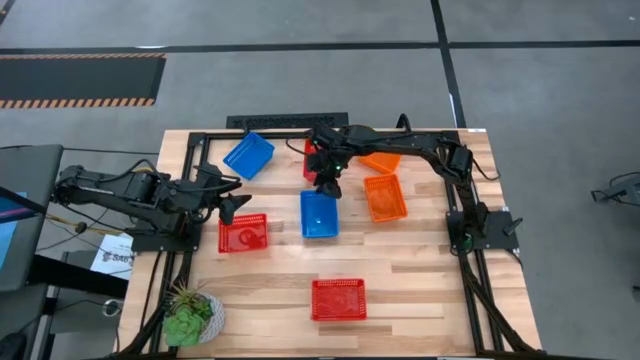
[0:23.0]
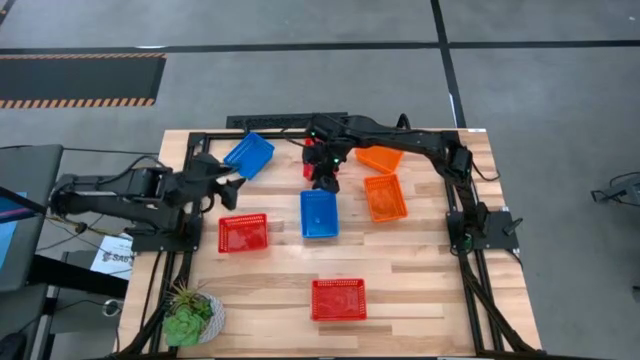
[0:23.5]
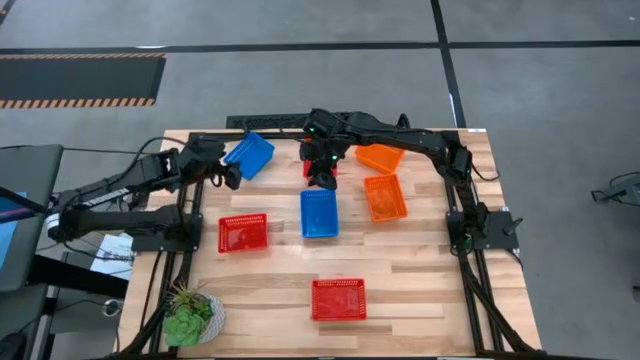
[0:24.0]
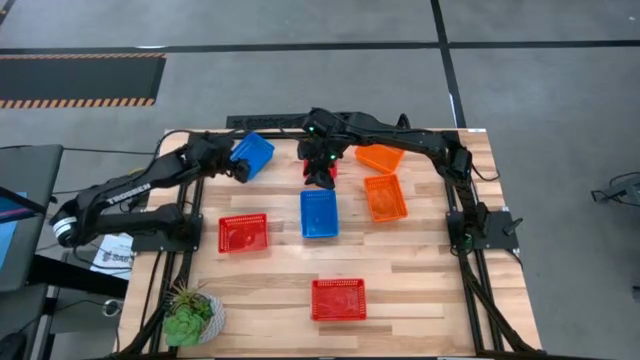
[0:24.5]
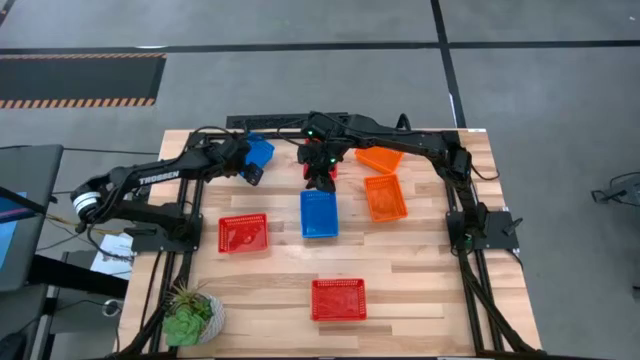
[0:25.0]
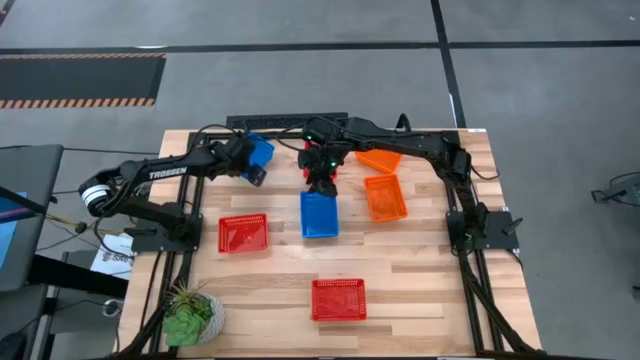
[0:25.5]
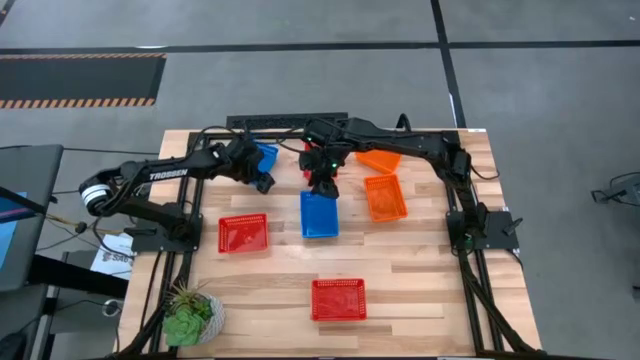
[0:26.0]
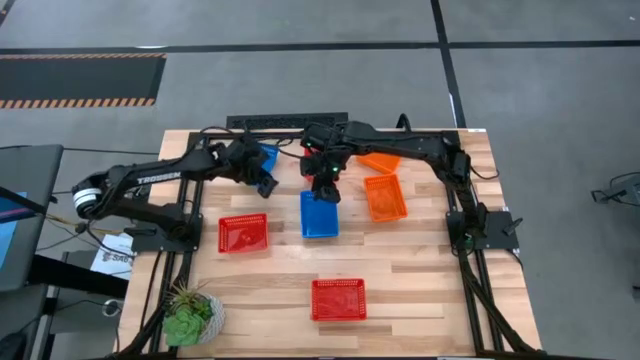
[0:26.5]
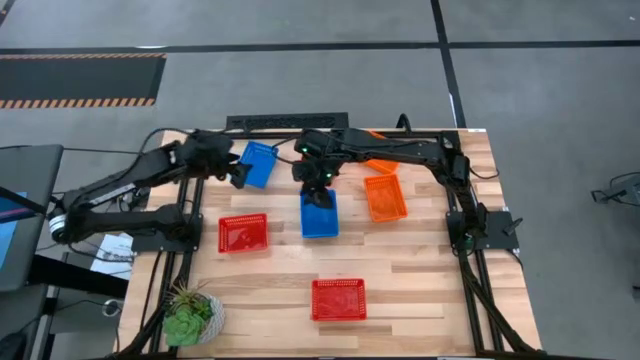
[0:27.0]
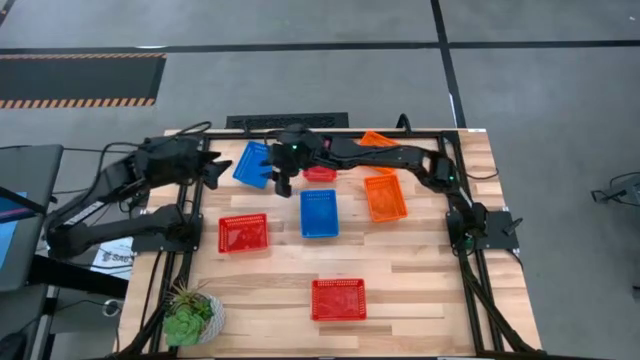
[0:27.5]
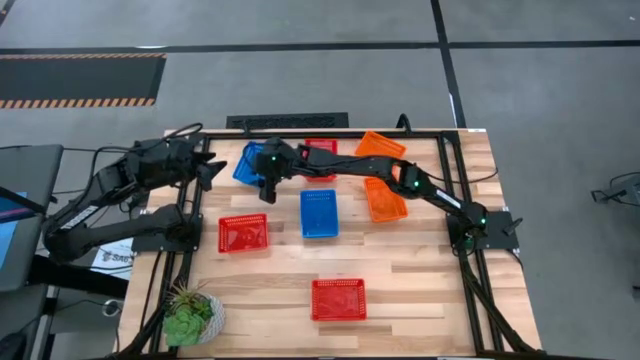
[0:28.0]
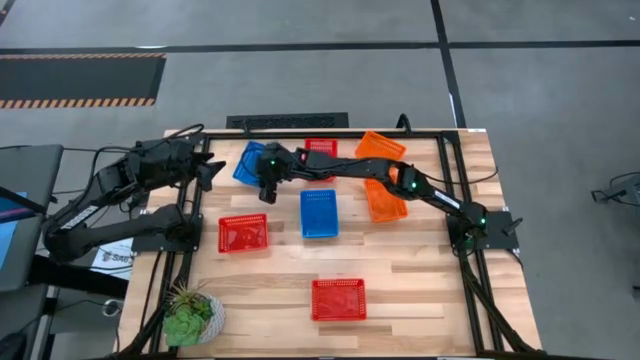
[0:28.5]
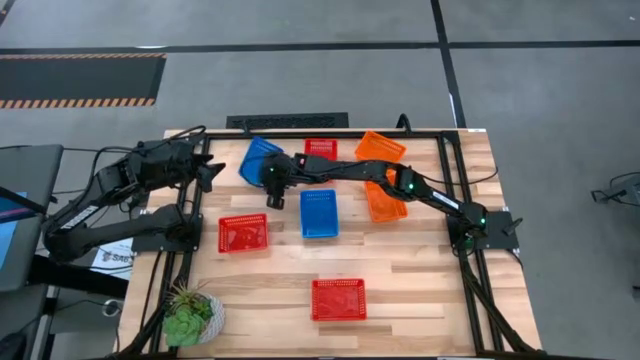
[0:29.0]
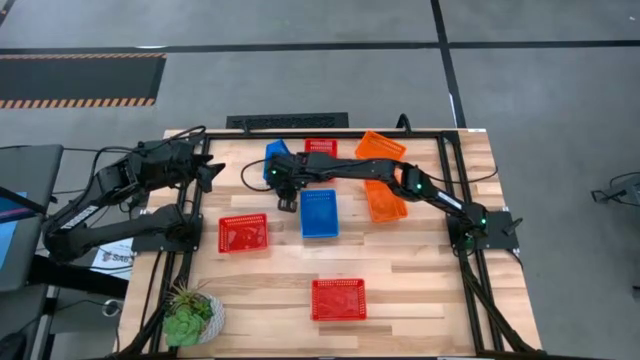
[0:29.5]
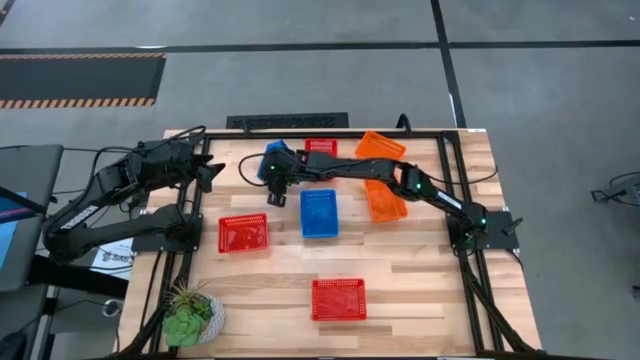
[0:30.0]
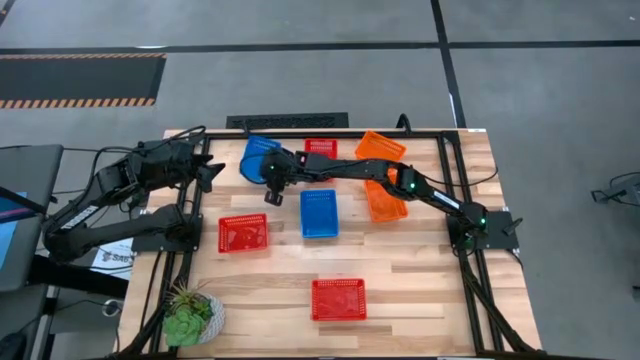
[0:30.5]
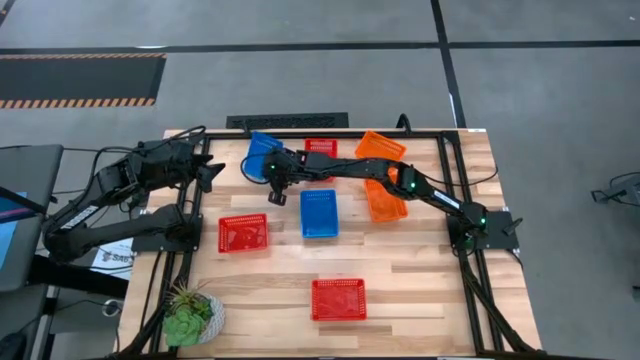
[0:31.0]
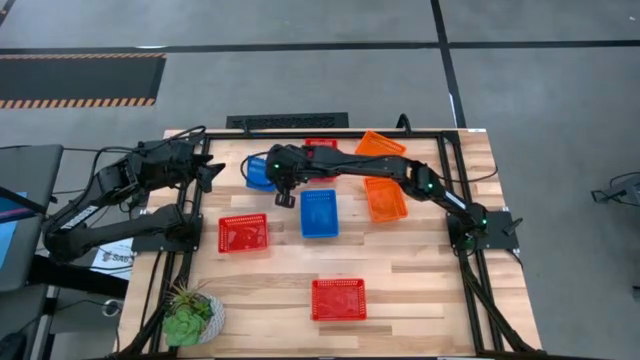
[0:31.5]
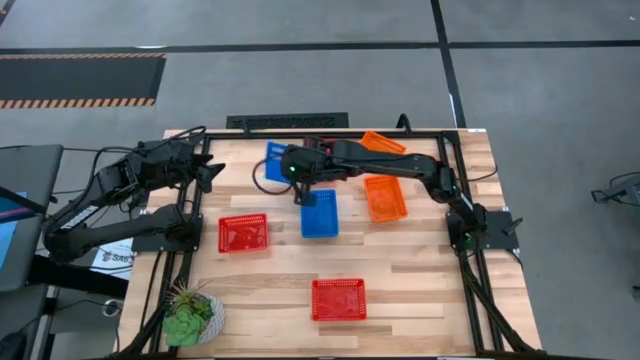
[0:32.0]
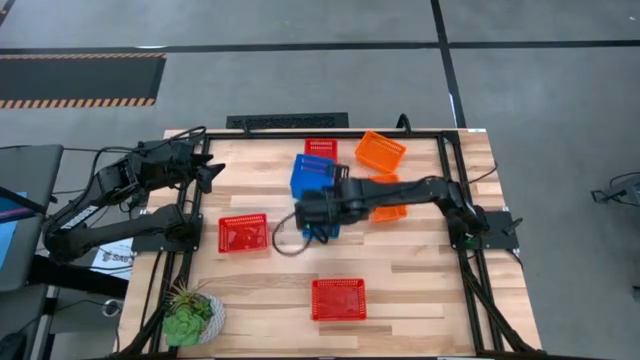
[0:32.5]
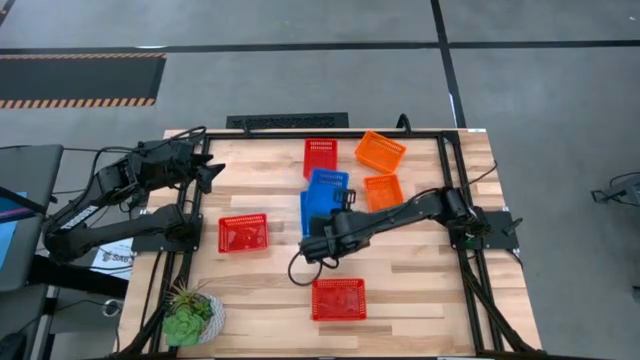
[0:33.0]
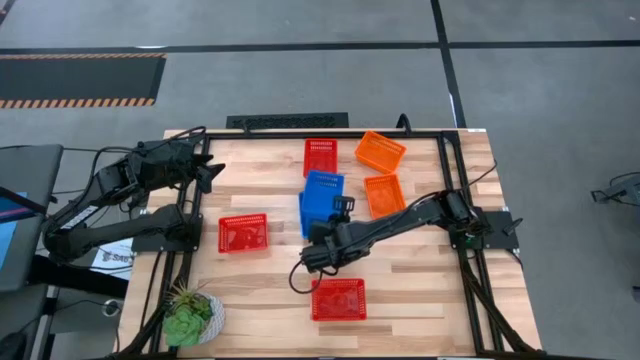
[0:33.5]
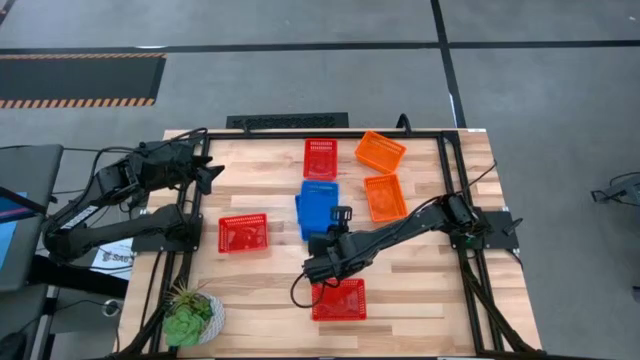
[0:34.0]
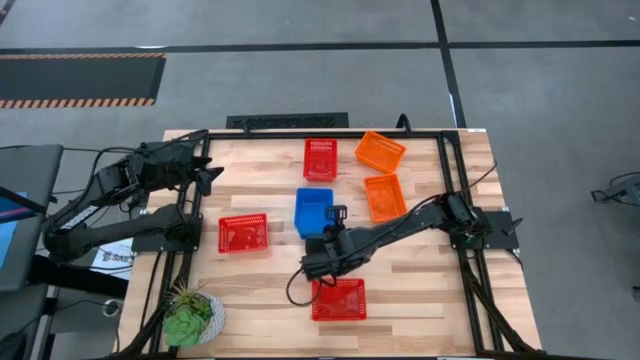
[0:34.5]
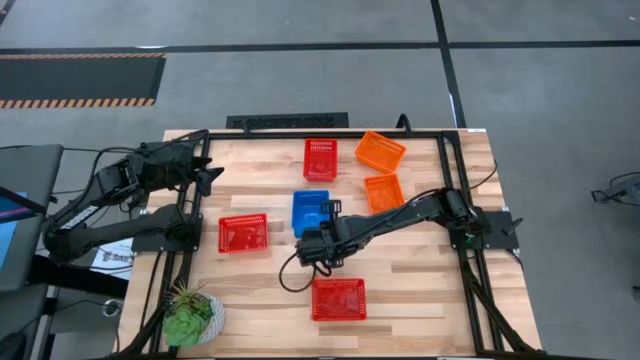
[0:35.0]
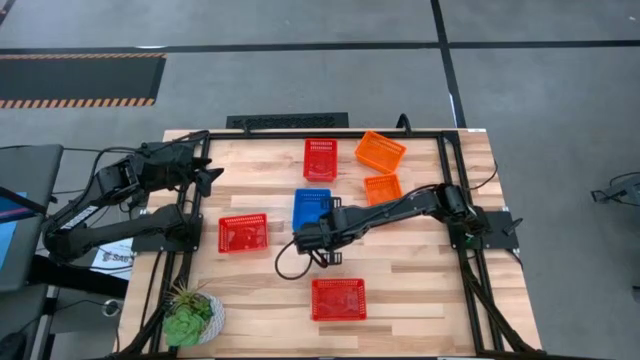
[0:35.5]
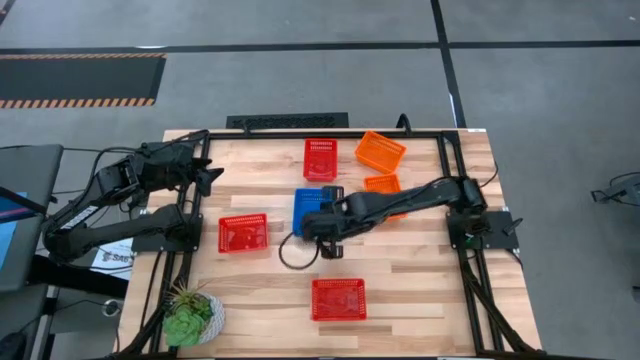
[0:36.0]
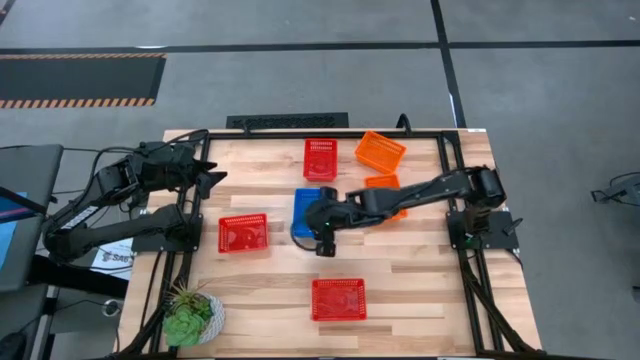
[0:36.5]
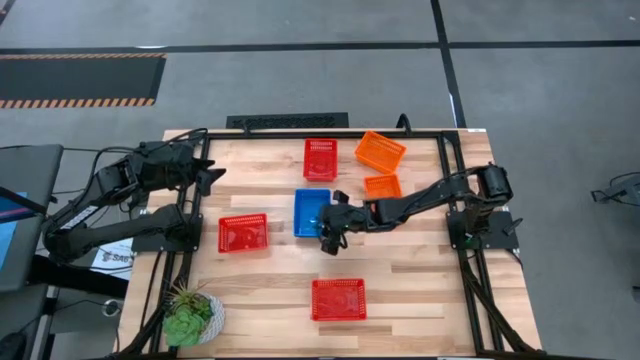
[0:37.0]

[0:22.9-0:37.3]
Stack the blue bin into the stacked blue bins

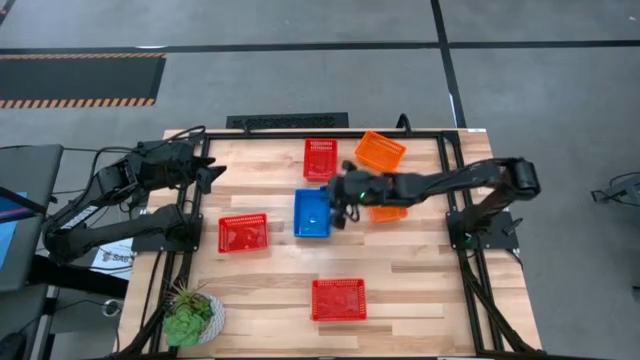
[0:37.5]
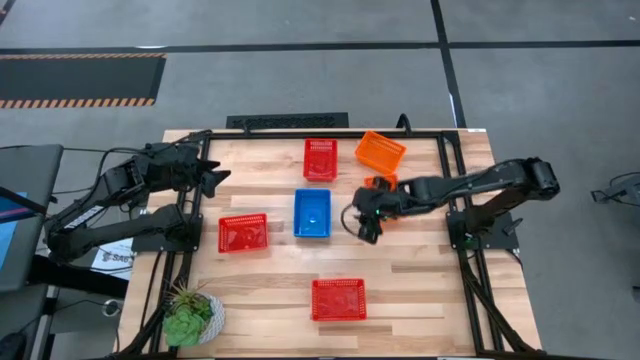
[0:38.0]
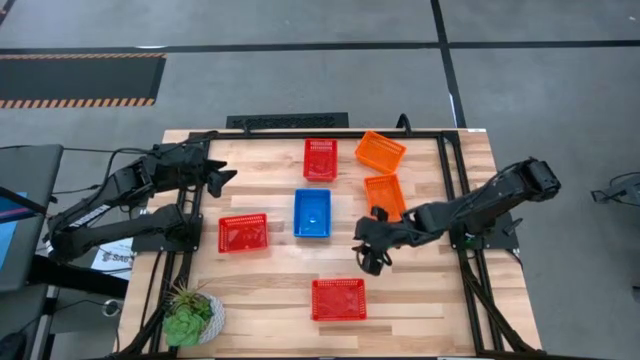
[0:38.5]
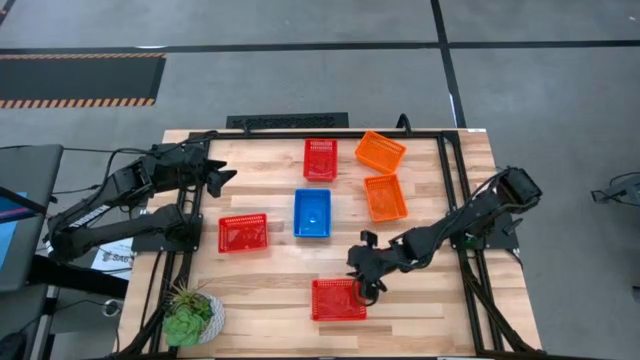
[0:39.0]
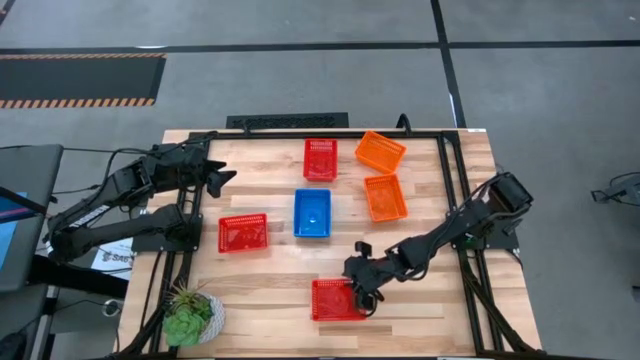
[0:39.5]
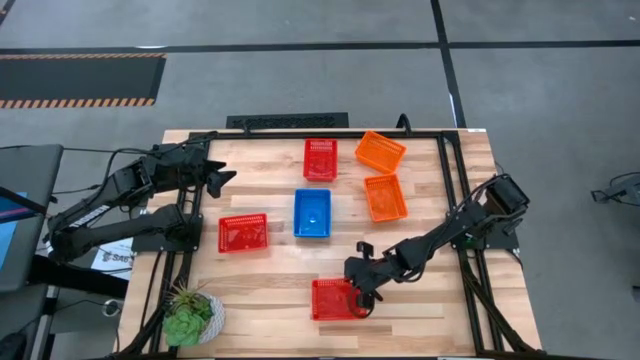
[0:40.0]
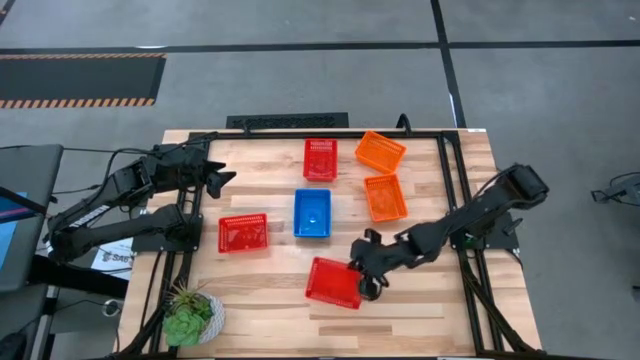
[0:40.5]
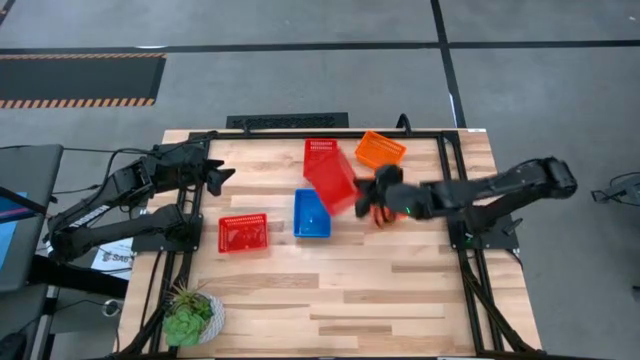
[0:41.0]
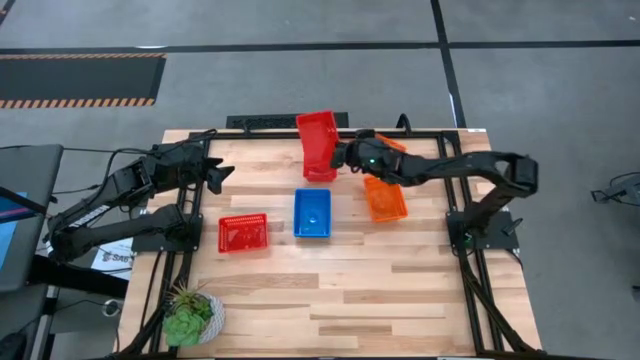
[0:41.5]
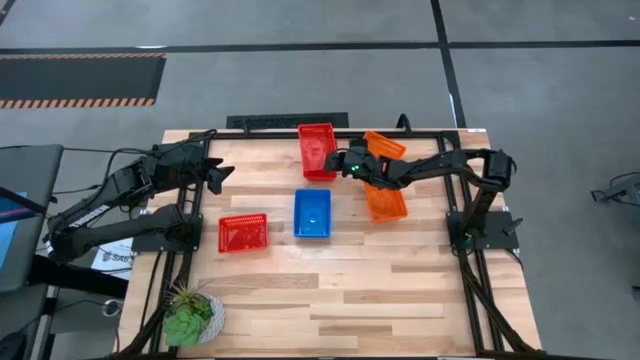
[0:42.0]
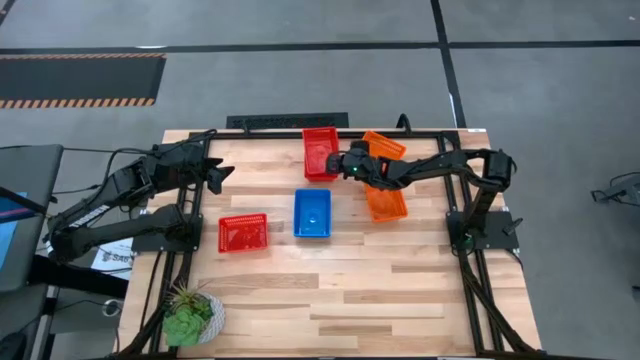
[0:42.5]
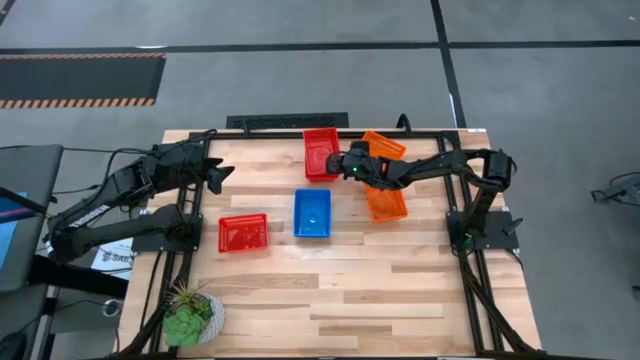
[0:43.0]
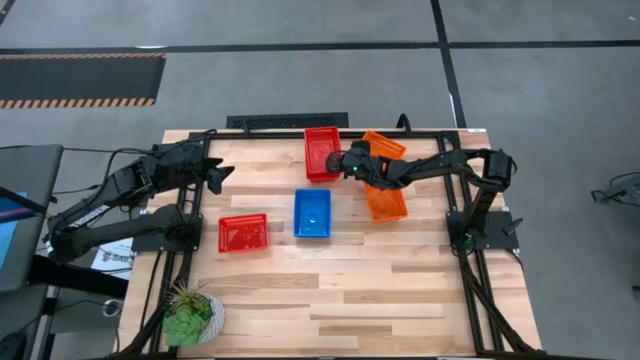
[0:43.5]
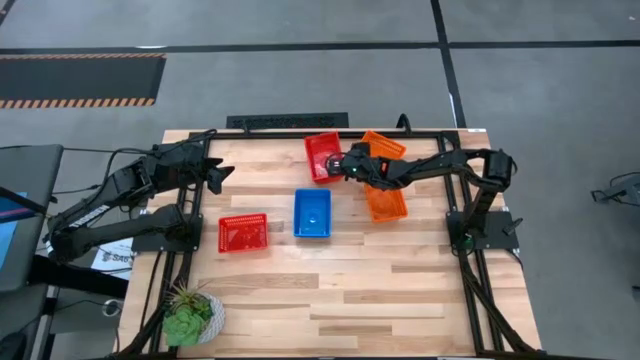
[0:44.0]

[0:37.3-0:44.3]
Stack the bottom red bin into the top red bin
